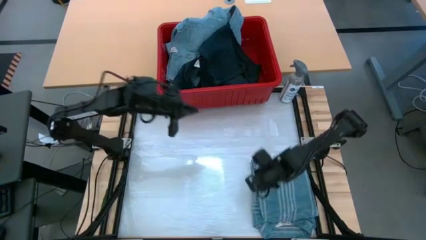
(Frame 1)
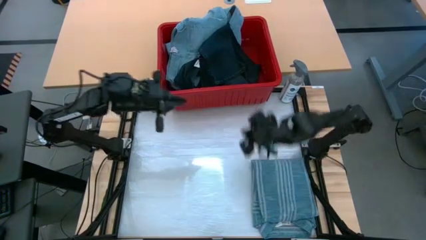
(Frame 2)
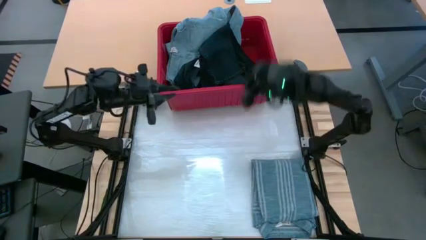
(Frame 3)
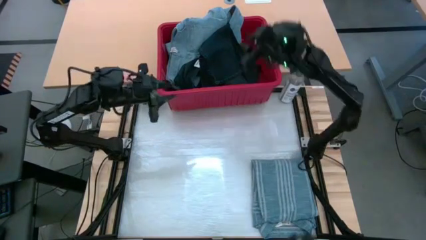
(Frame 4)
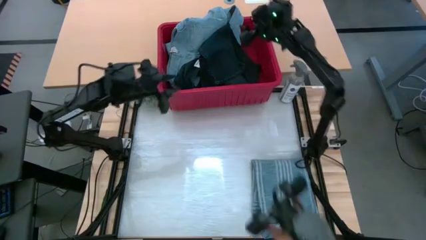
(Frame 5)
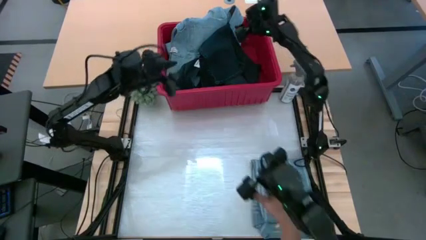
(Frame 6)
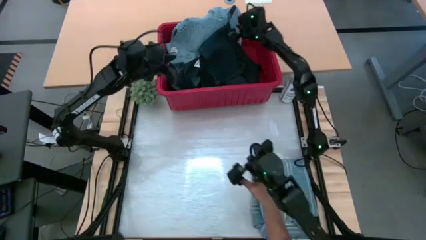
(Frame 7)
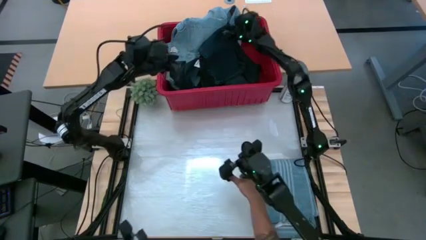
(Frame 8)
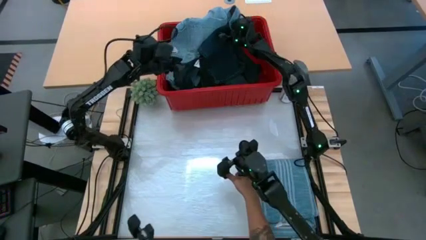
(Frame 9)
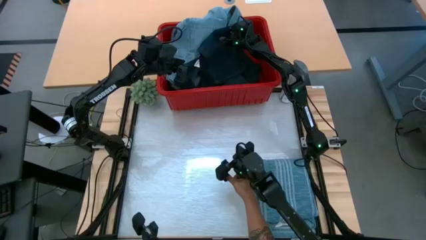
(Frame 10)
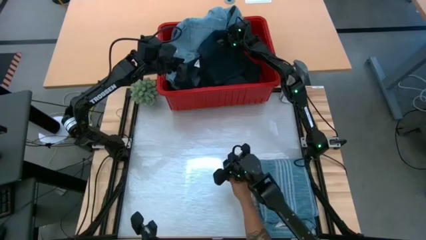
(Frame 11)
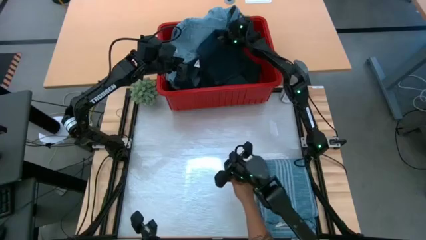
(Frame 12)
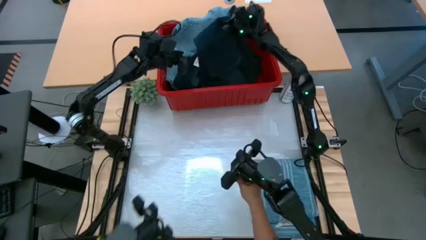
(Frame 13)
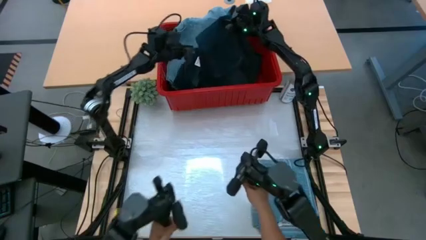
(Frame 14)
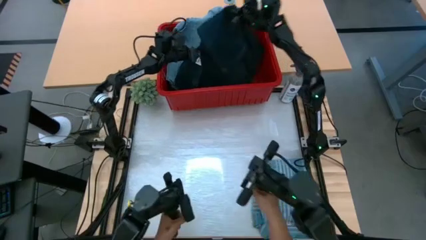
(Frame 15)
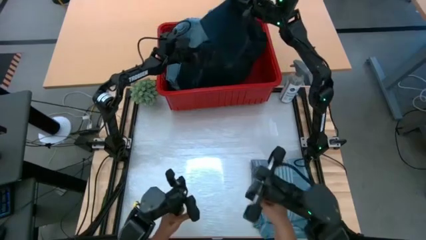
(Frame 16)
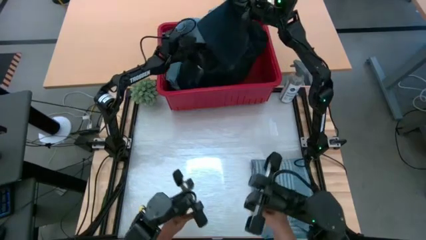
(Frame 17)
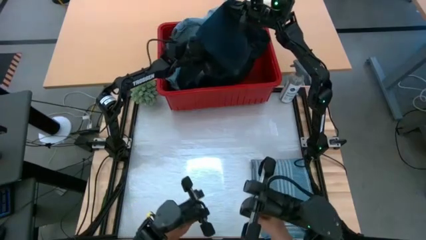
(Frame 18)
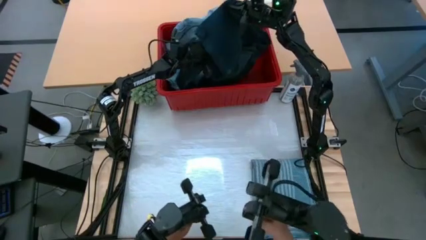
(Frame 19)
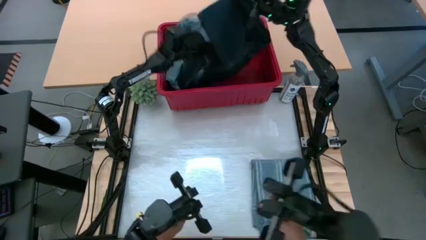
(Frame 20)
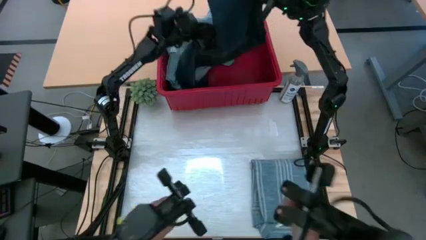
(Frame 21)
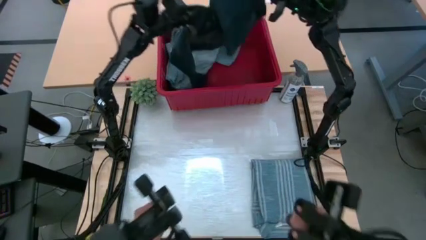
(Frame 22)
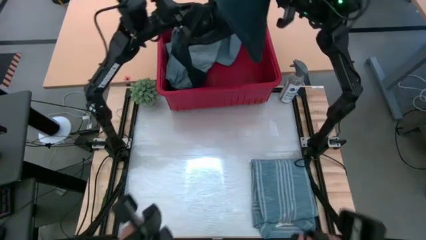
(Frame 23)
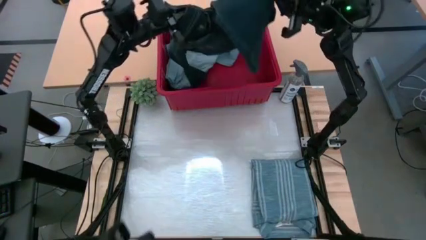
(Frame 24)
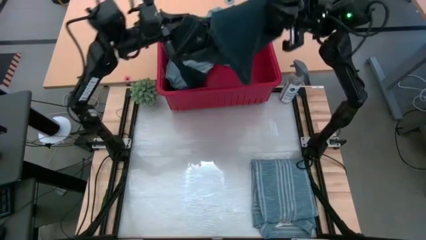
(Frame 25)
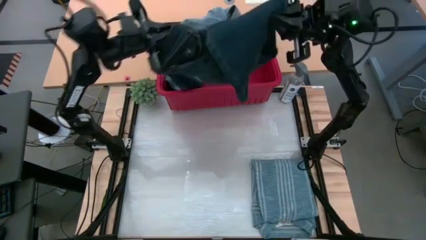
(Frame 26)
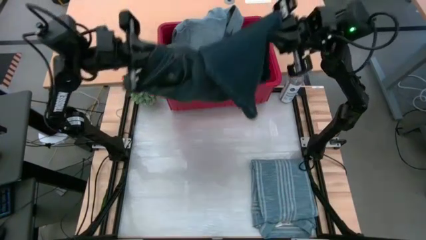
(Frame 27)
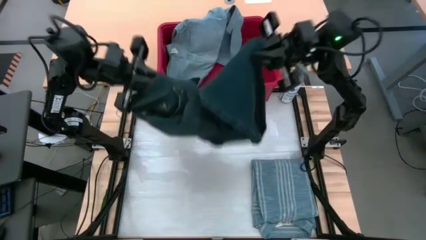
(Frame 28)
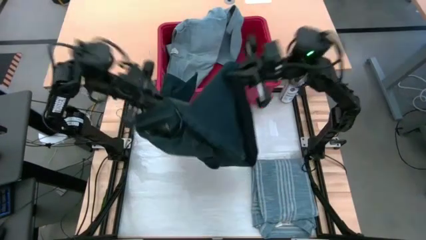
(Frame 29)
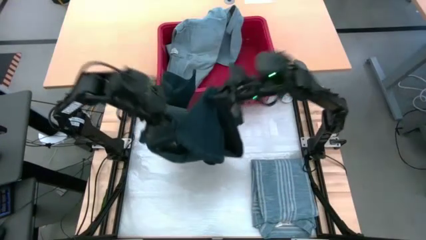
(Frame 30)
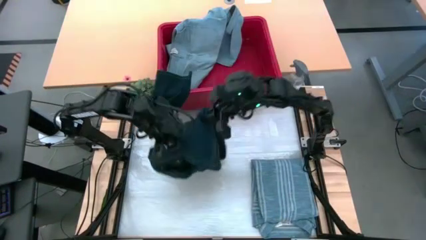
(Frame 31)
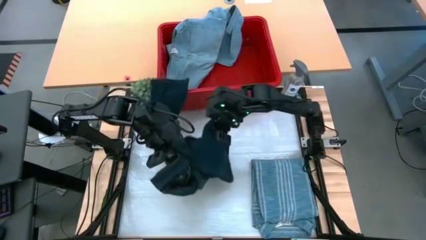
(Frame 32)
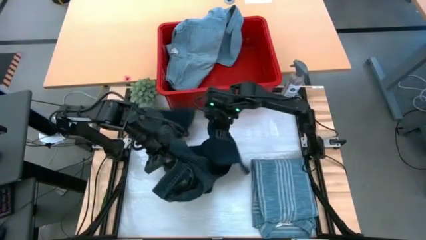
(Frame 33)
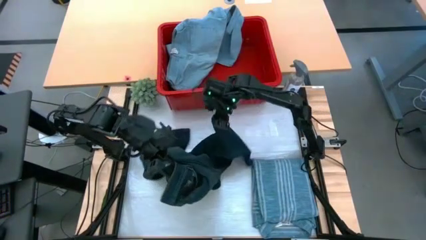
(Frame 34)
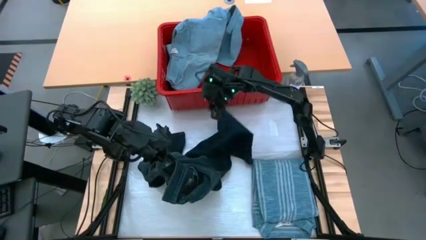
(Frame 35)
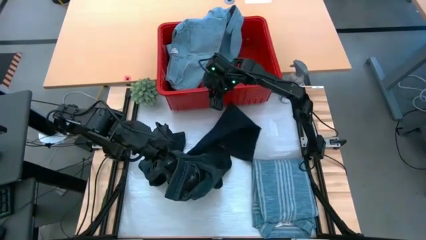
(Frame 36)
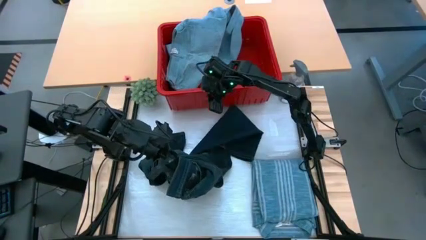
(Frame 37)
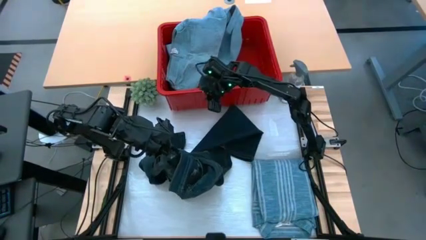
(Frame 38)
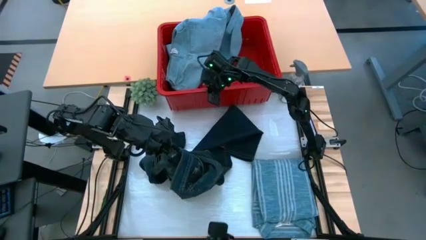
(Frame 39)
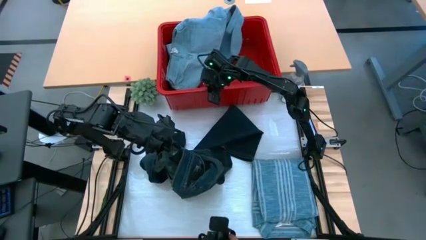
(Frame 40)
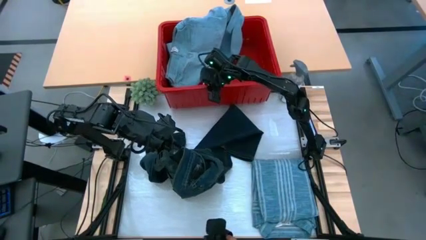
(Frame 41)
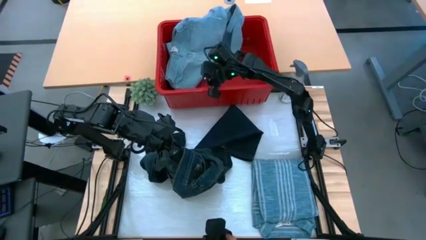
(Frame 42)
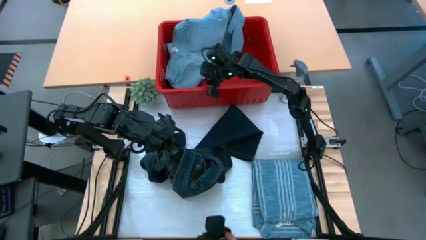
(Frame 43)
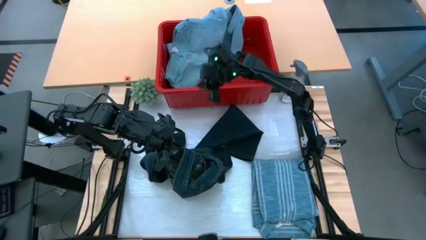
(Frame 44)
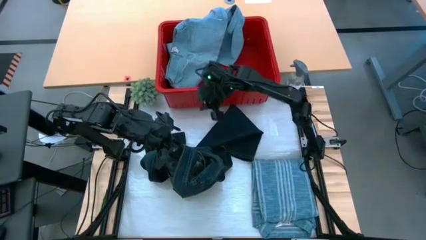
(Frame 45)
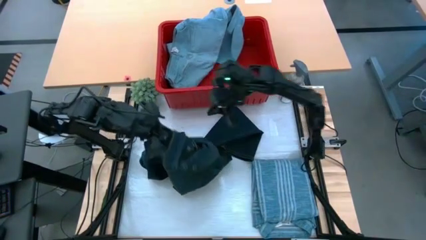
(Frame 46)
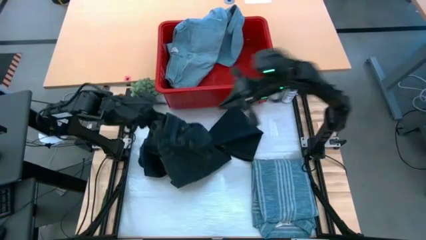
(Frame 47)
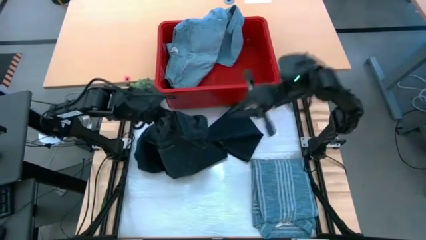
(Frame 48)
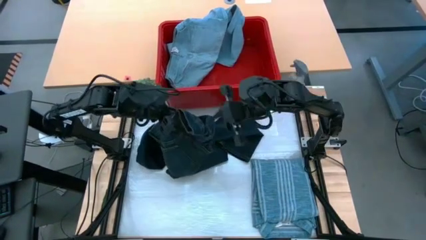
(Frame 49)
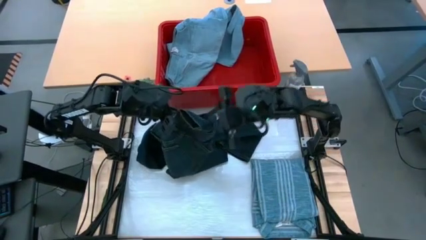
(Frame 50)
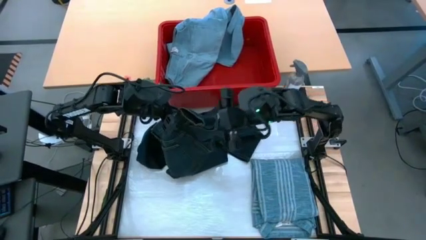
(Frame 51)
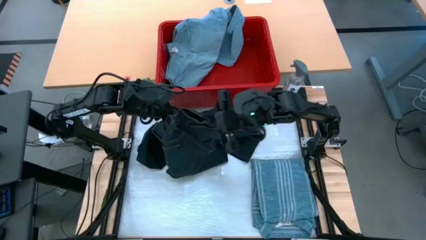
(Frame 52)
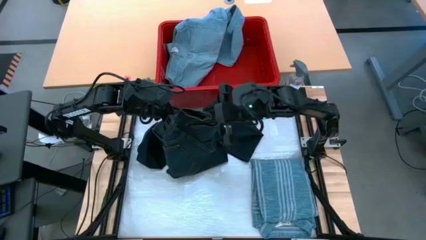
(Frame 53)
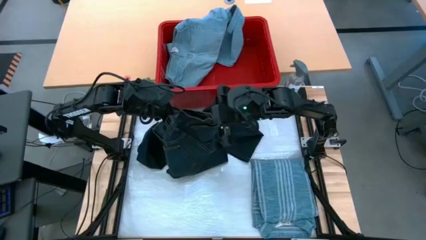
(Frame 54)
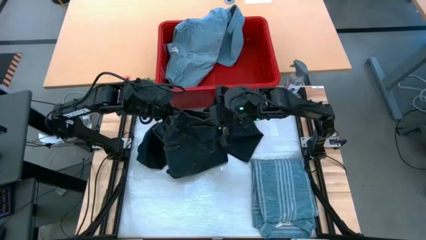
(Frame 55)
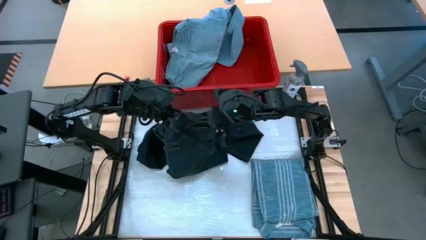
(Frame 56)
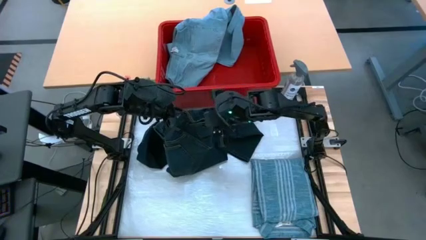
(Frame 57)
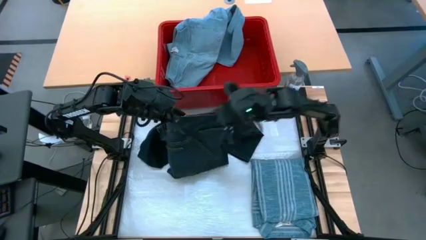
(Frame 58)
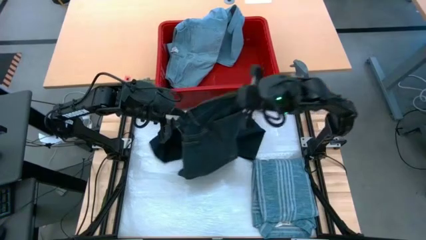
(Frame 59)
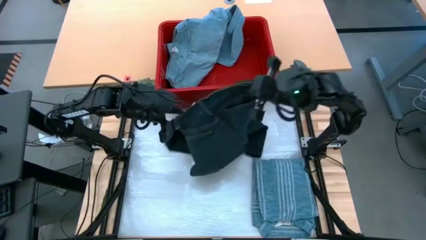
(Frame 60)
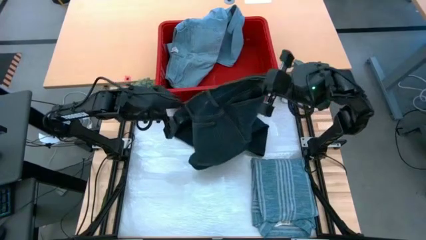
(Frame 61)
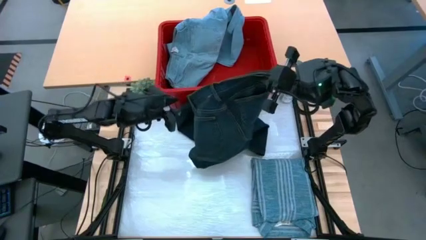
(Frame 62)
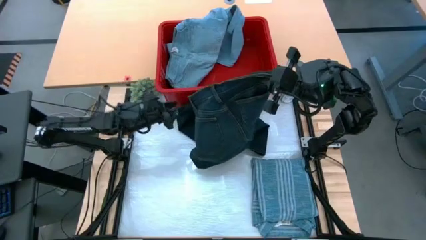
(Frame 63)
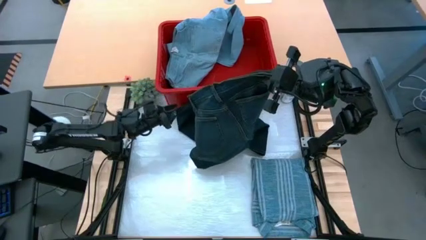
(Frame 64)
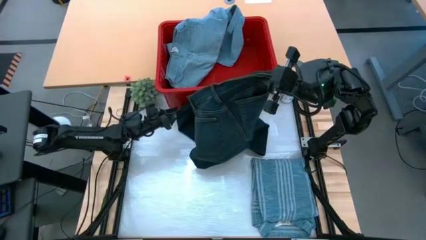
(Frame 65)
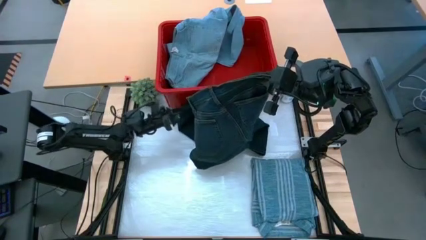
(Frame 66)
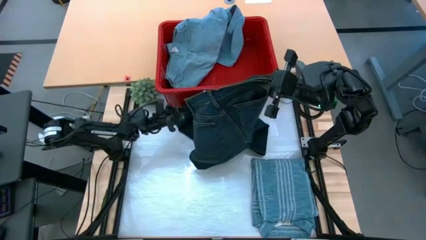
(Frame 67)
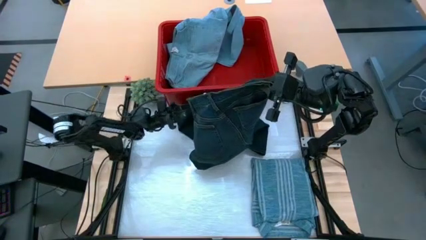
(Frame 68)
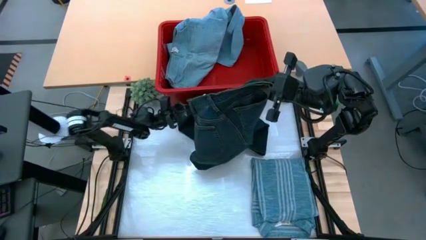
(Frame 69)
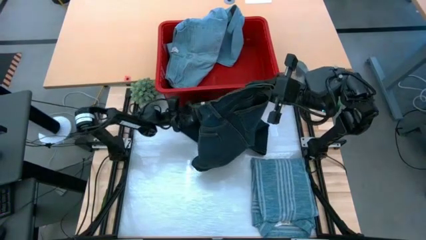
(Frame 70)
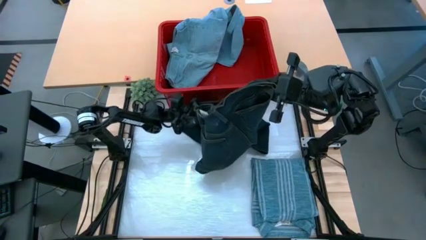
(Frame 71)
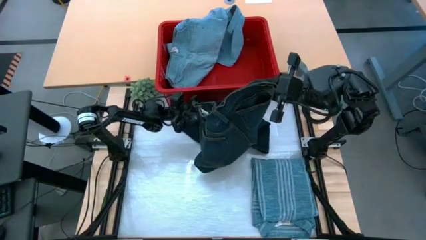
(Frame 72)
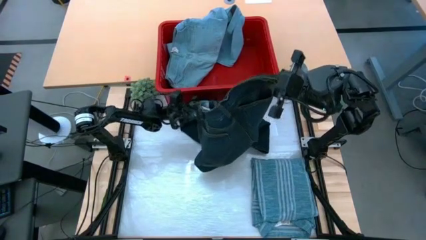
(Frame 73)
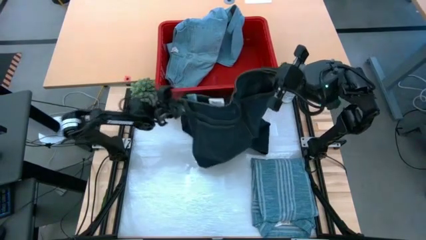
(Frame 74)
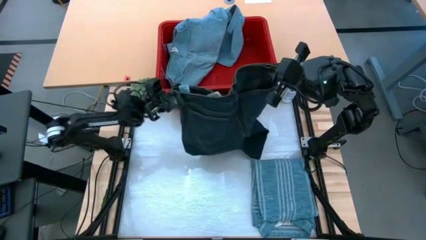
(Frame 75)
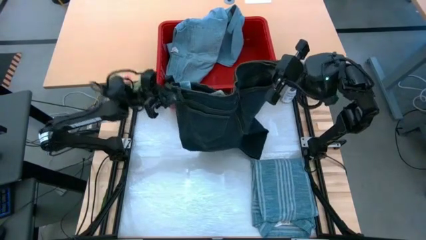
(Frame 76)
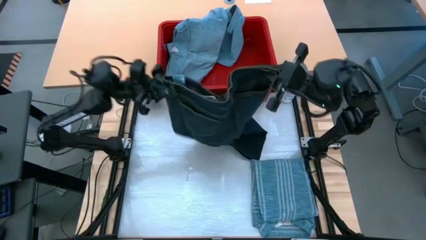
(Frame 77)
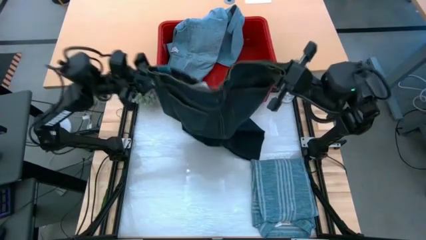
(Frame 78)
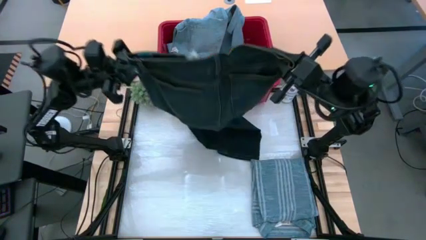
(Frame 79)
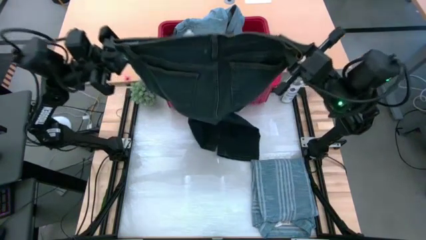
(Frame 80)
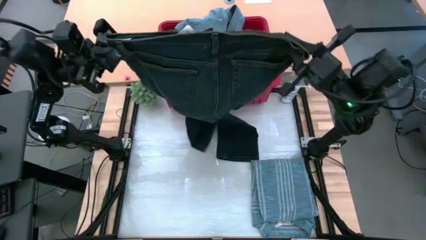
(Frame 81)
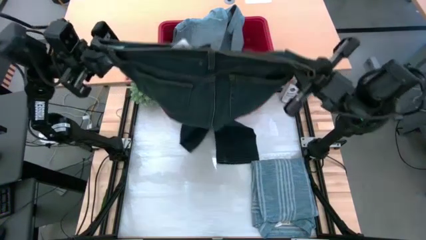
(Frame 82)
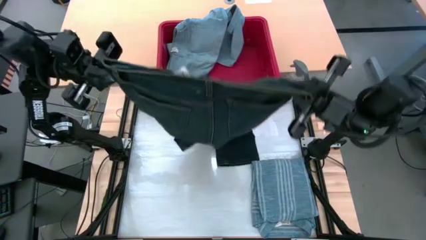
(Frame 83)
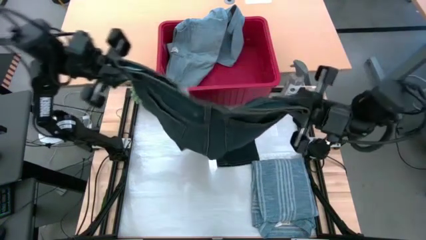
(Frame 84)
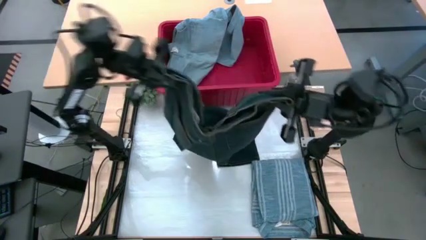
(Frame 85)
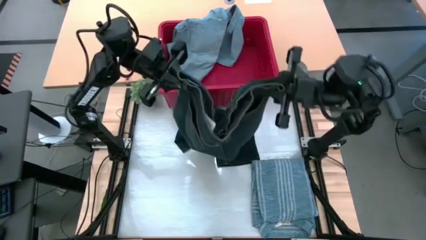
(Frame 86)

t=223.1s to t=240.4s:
Task: Fold Laundry from Bin
Fold the blue denim pants
